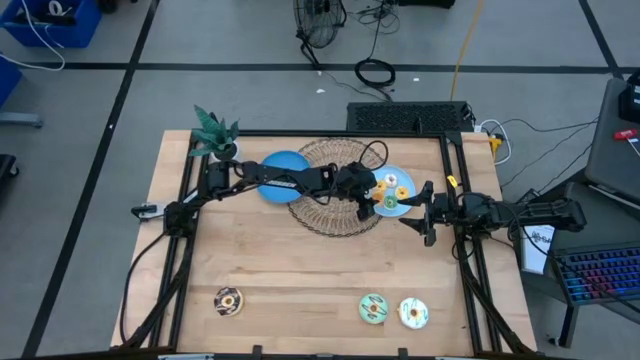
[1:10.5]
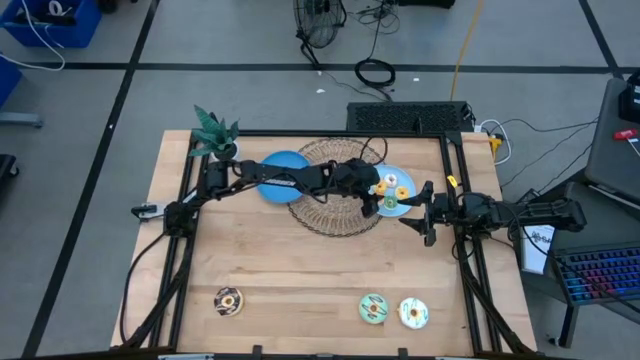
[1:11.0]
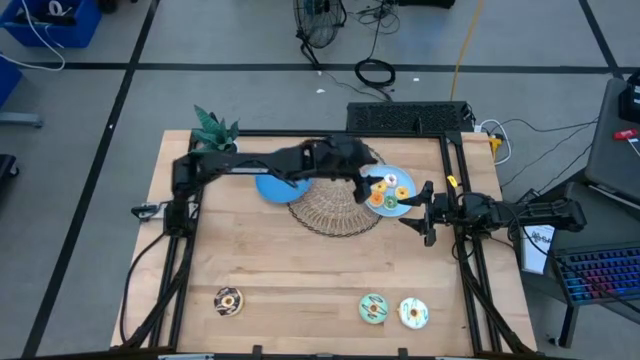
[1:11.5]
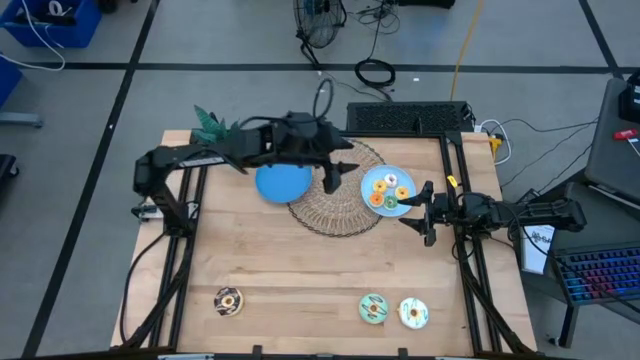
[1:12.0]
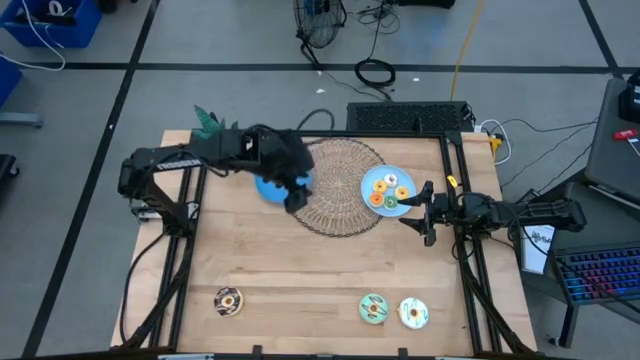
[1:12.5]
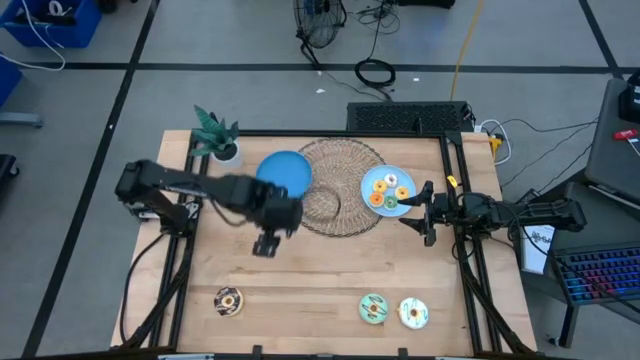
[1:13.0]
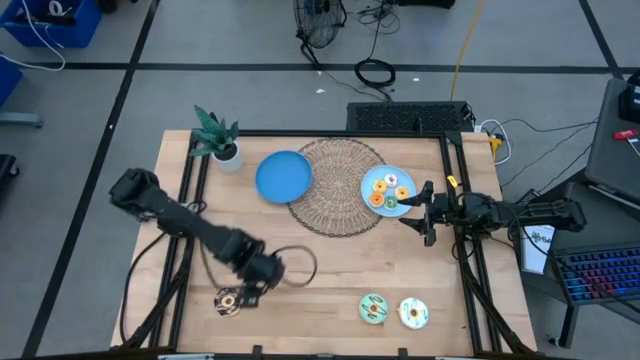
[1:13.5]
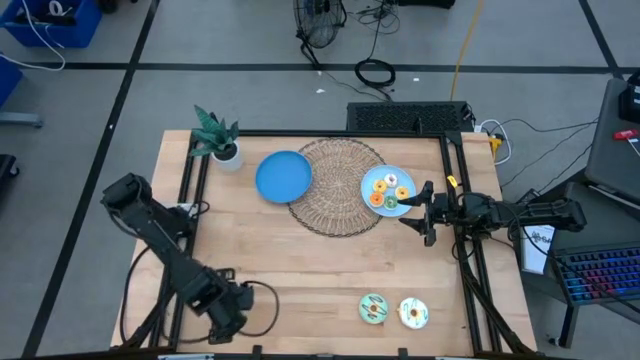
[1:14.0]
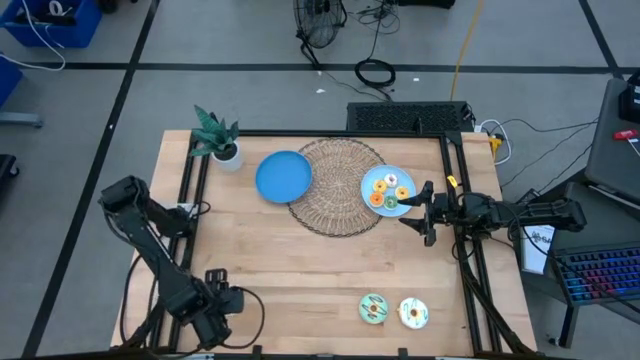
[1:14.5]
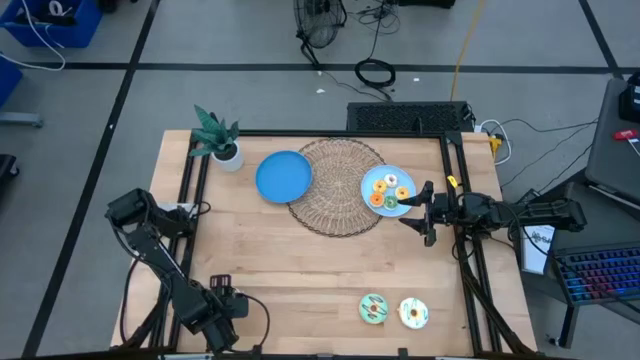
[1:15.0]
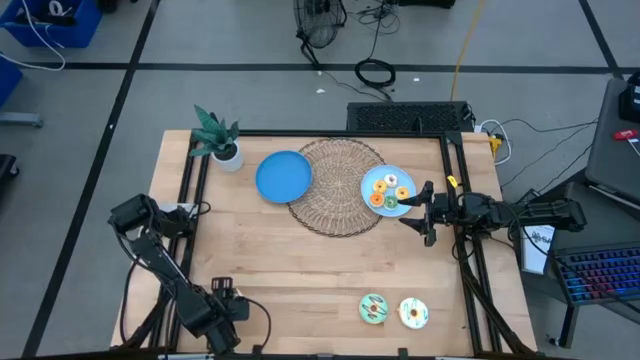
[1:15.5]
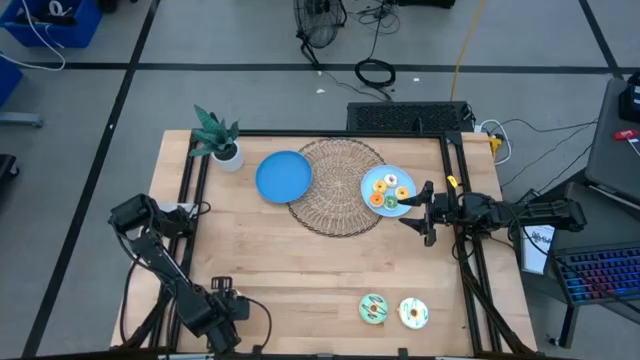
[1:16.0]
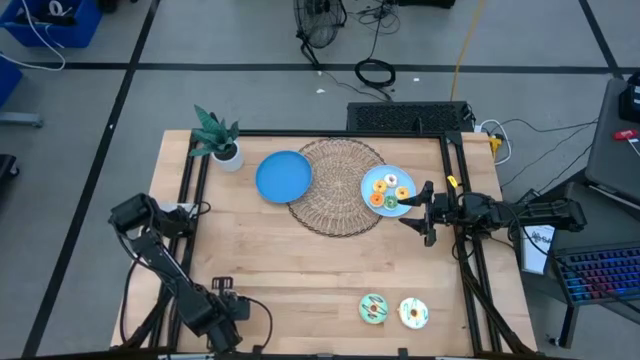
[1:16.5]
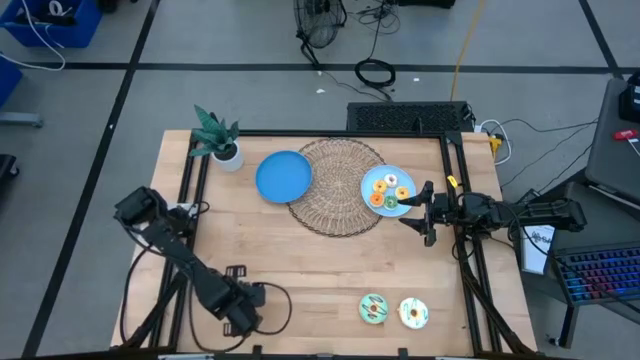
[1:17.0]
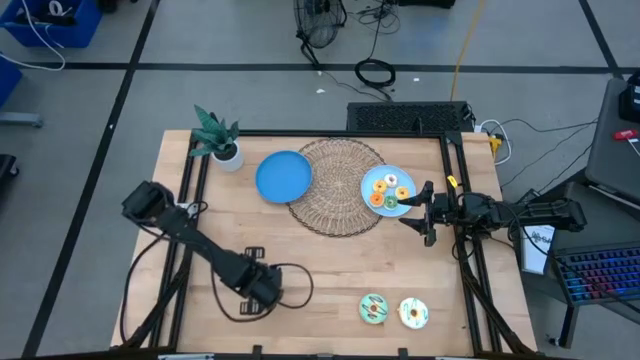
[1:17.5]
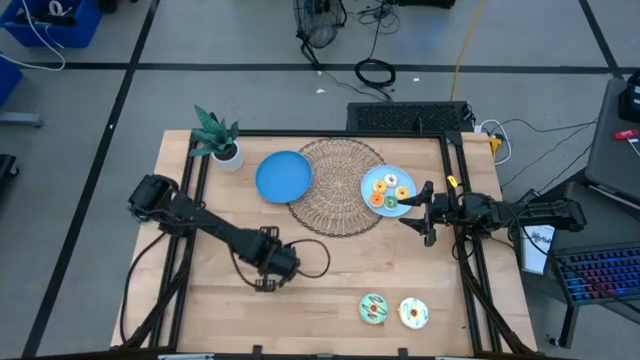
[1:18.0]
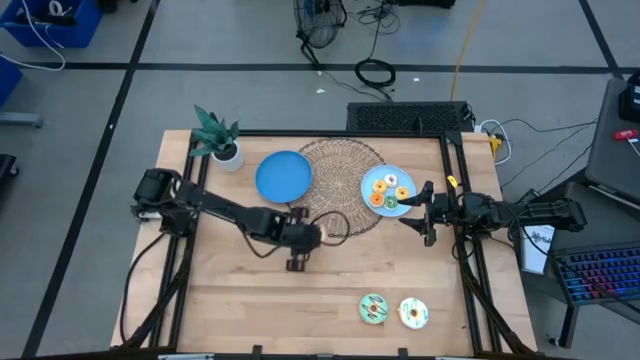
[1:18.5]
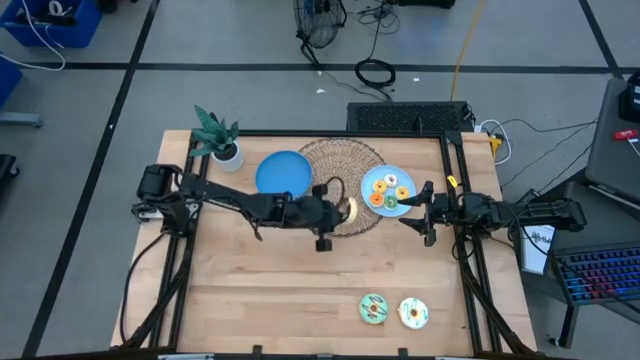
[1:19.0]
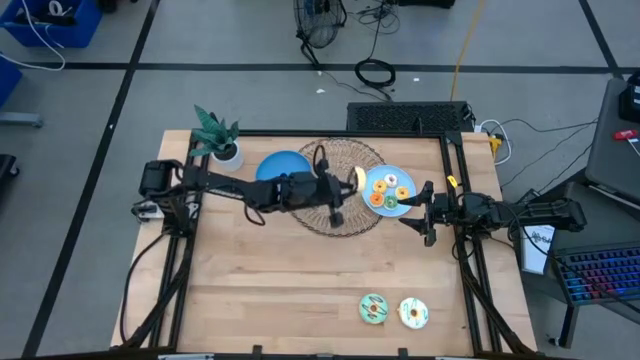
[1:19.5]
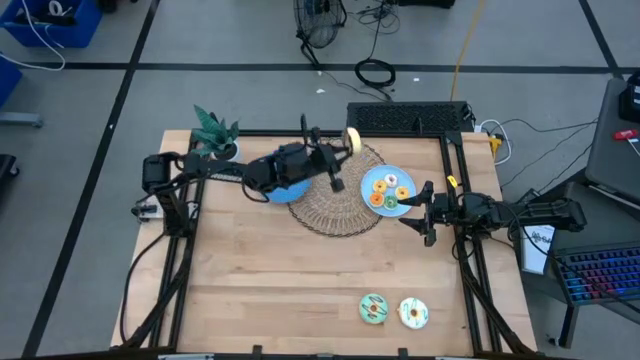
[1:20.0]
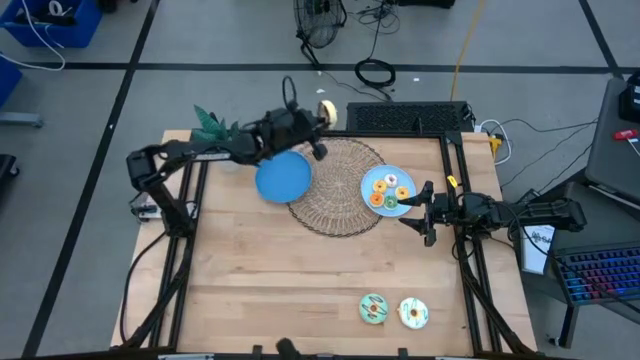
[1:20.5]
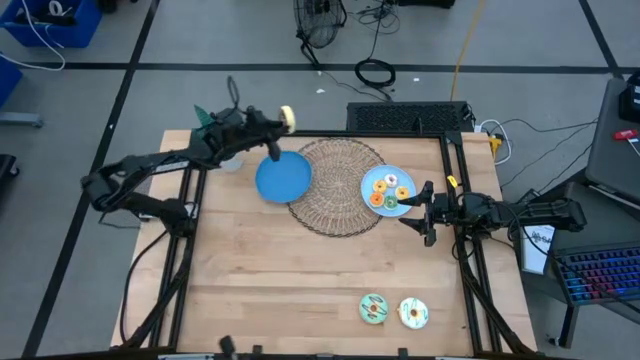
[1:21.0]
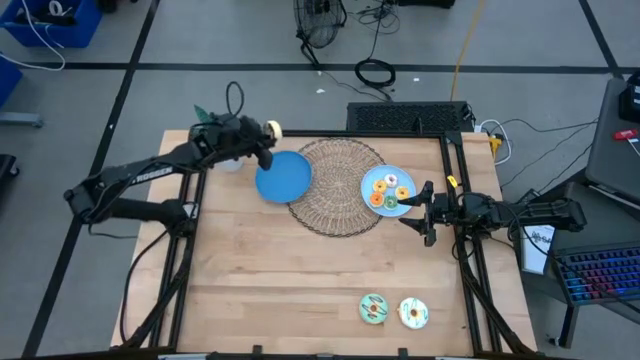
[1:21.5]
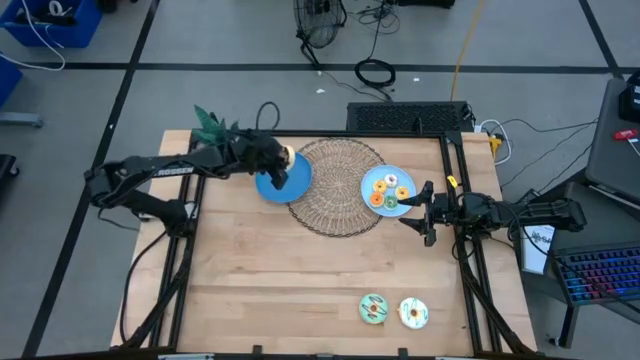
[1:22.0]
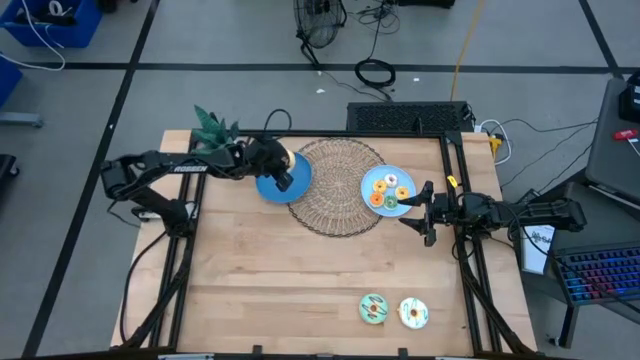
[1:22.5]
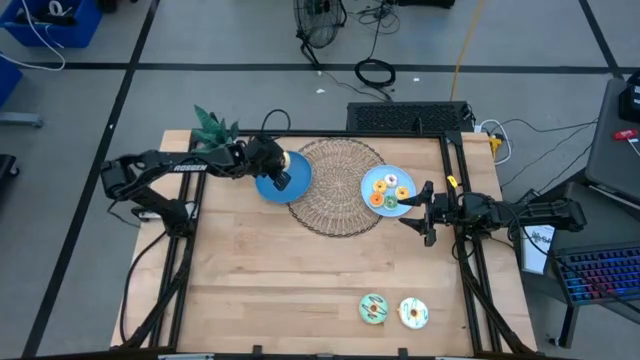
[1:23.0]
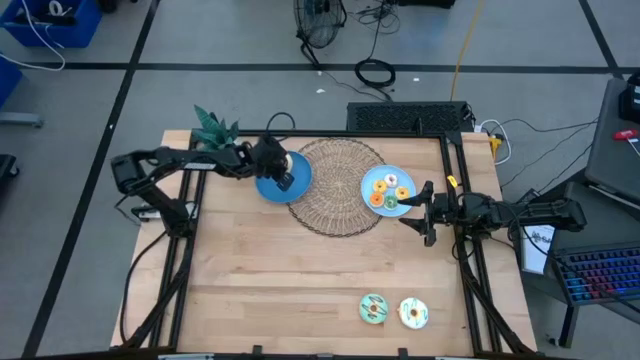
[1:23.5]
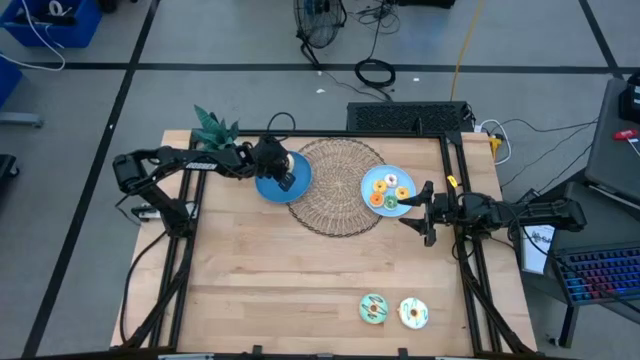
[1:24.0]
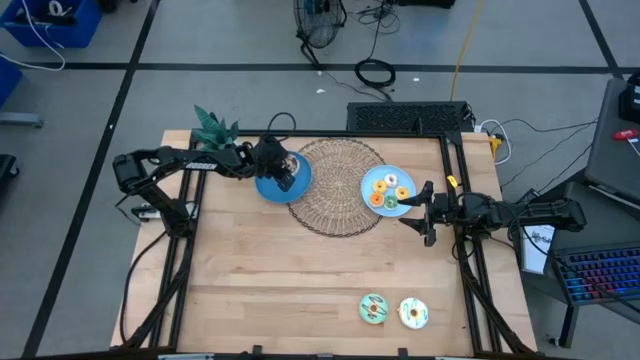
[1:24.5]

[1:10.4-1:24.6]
Task: Pick & Place donuts
Put the large black donut on the dark blue plate
